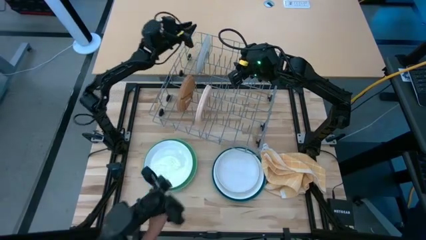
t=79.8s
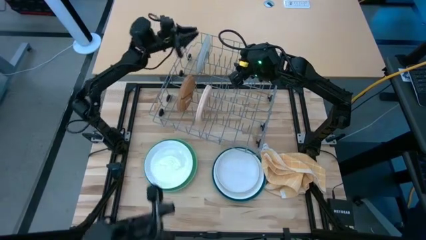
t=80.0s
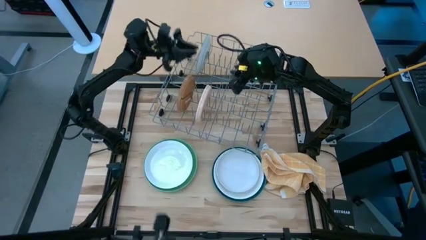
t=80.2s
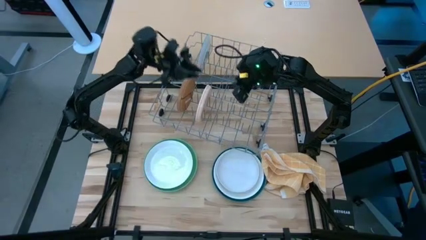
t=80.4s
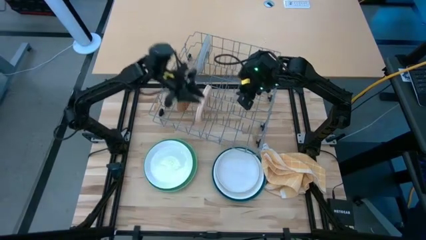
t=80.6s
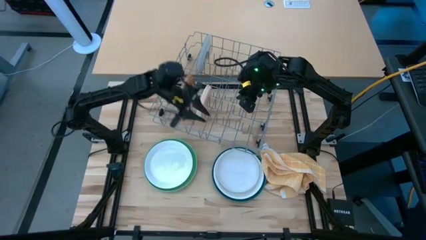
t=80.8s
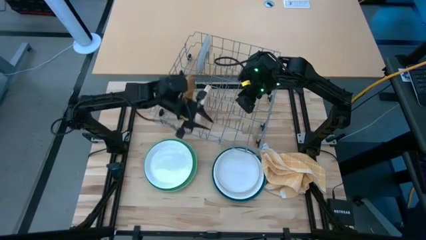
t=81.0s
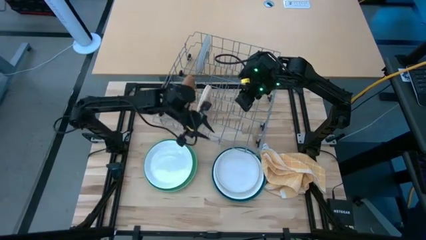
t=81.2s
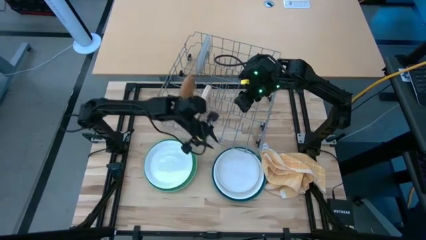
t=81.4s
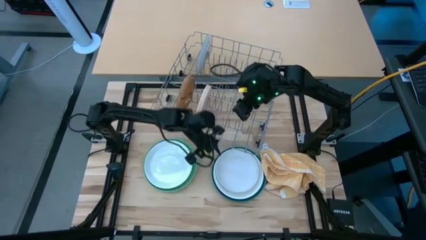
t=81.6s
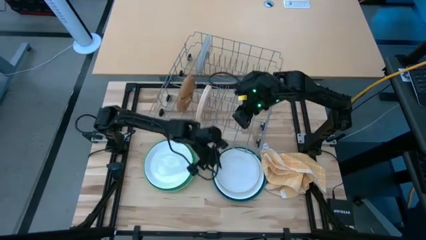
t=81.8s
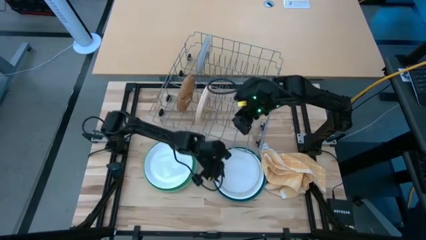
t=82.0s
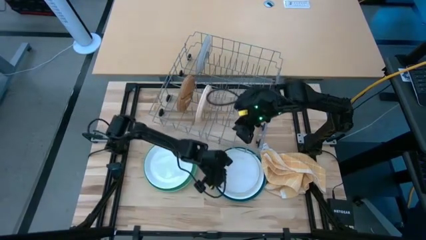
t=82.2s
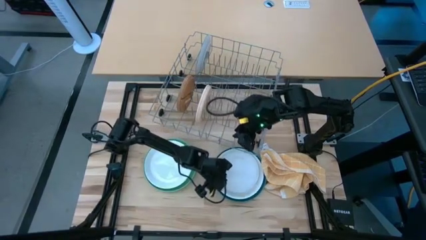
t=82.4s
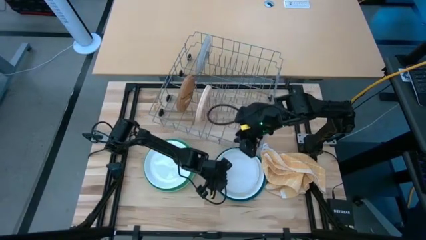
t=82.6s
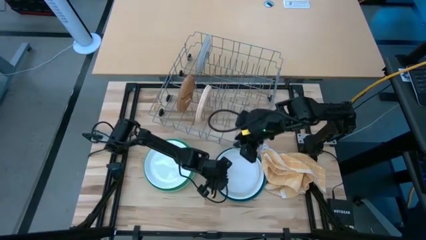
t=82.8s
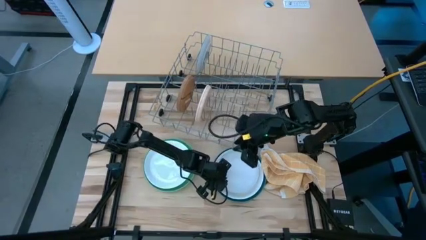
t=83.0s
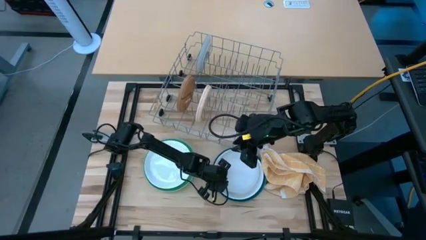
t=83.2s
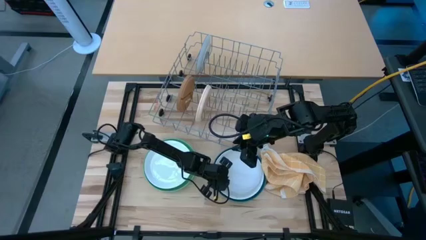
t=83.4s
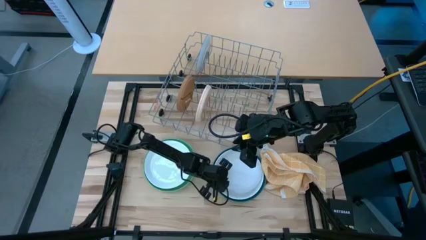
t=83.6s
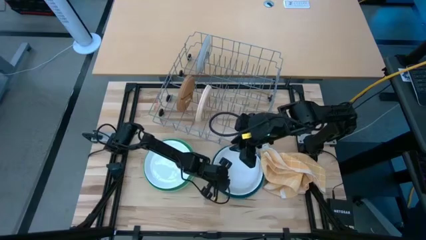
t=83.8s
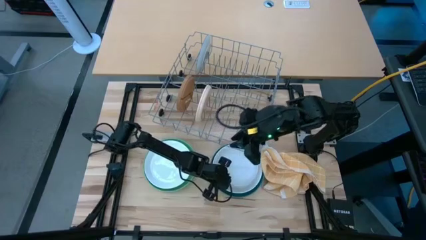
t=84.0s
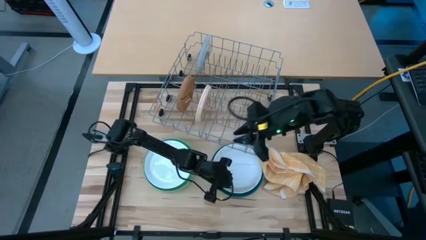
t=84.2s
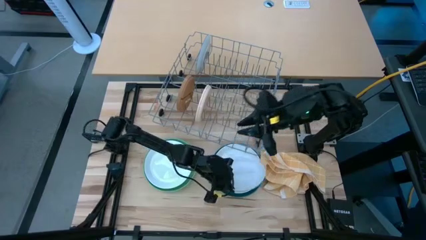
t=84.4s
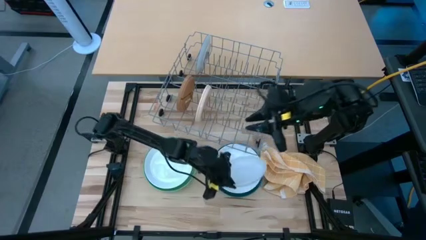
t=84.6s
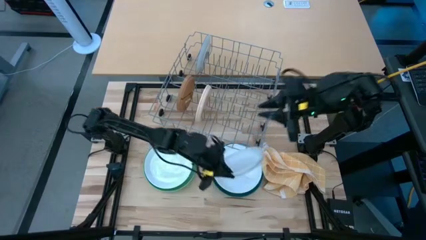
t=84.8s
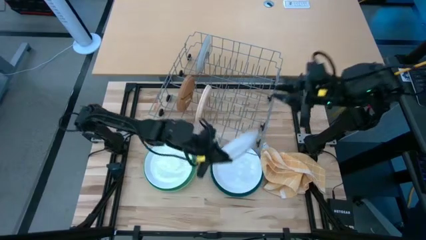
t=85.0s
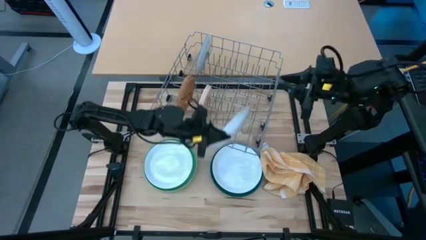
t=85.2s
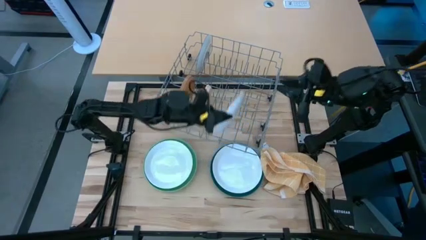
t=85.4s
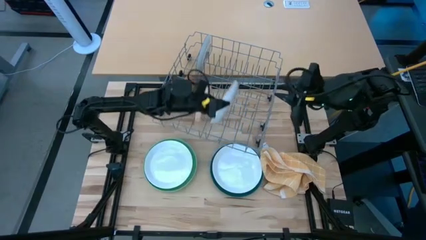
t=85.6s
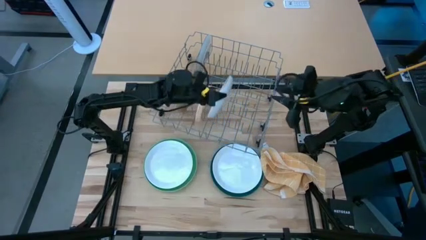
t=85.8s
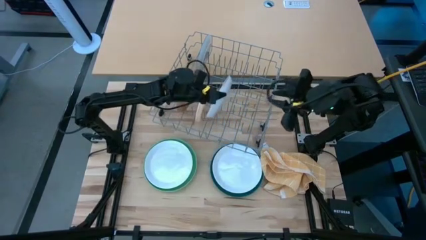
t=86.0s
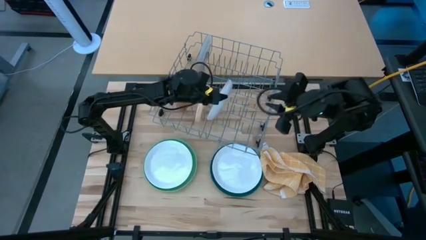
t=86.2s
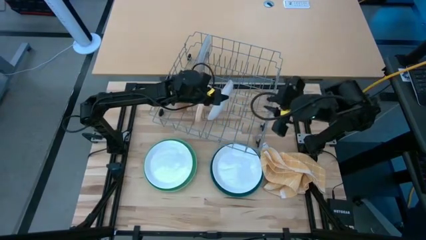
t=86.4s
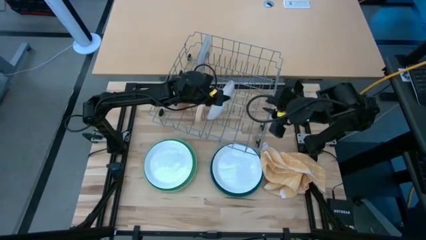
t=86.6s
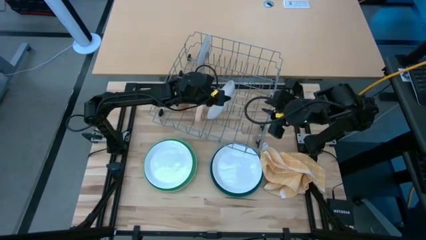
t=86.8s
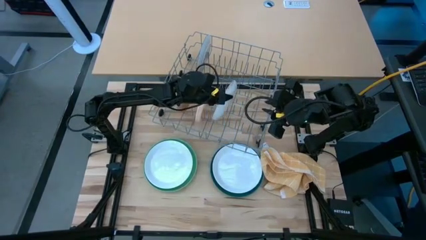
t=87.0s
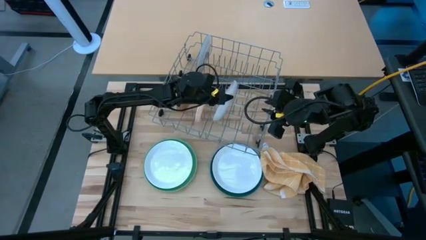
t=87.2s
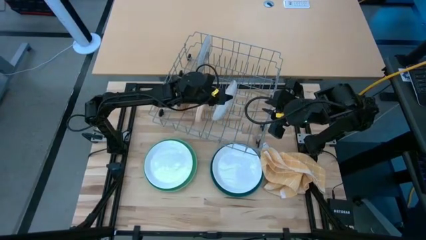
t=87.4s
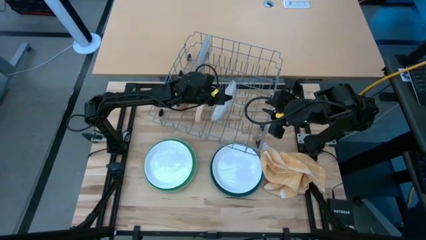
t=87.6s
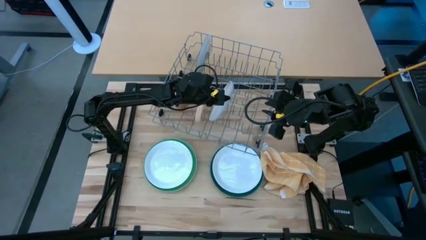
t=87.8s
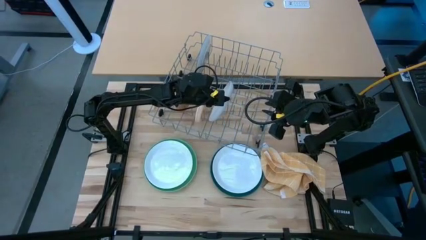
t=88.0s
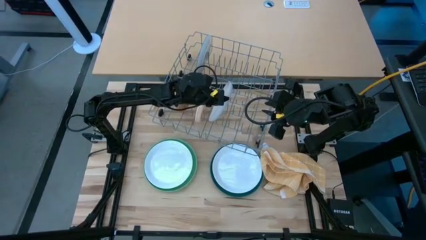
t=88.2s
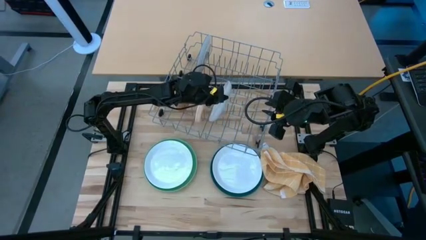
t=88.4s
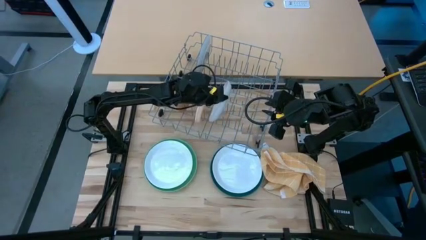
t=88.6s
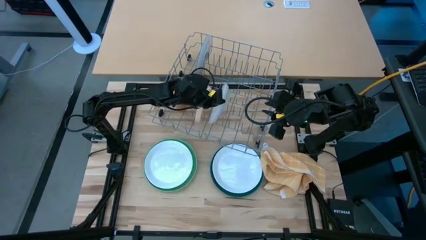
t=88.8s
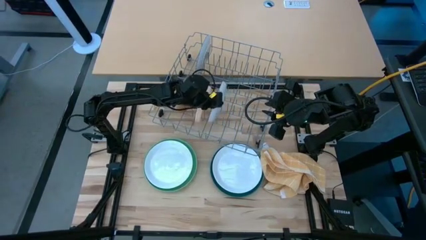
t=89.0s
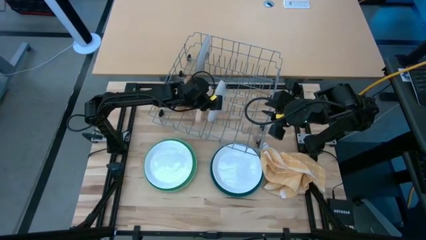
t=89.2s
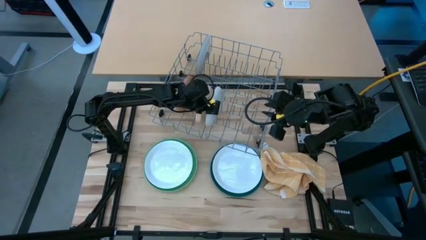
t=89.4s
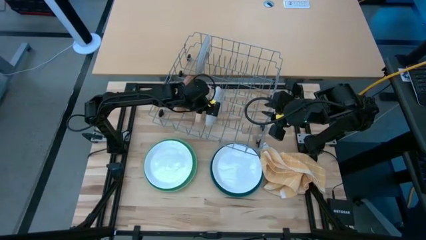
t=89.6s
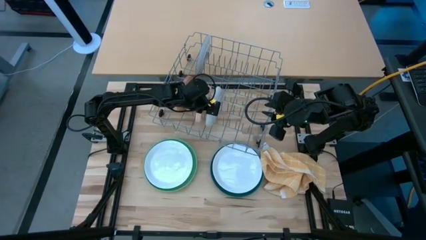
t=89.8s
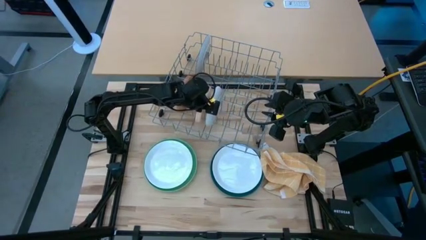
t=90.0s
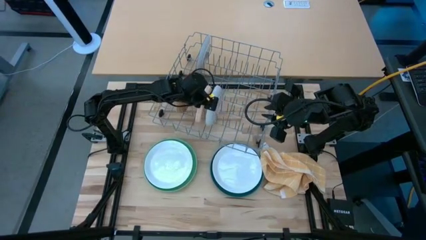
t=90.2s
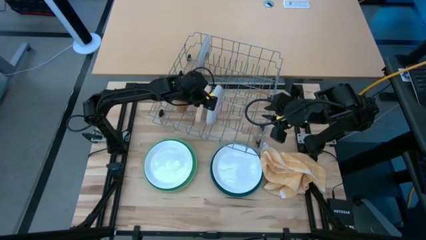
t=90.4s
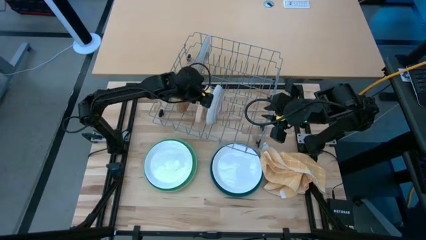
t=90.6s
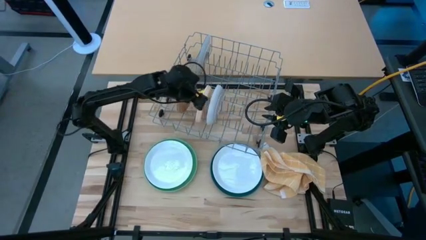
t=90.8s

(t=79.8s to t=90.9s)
Task: Sort dishes
Put the small white plate in the dish rack
